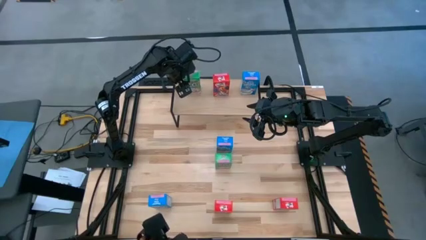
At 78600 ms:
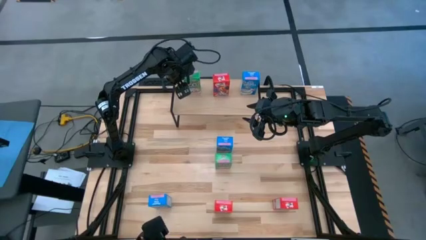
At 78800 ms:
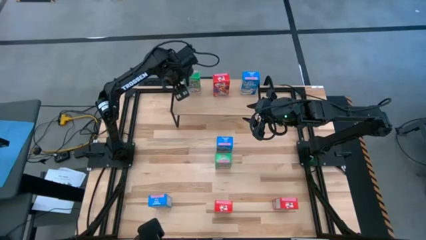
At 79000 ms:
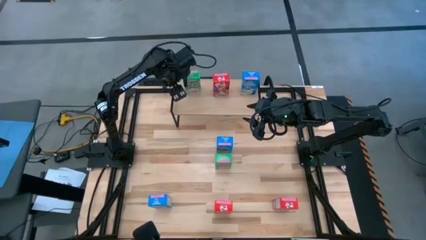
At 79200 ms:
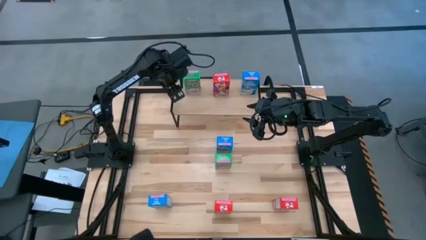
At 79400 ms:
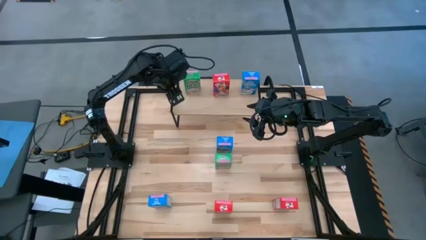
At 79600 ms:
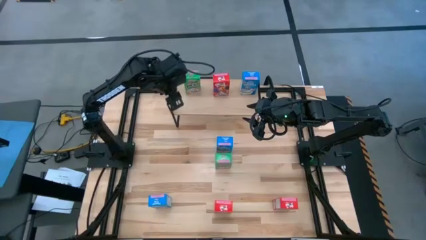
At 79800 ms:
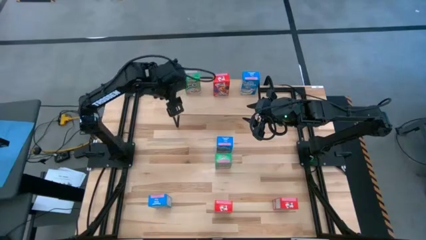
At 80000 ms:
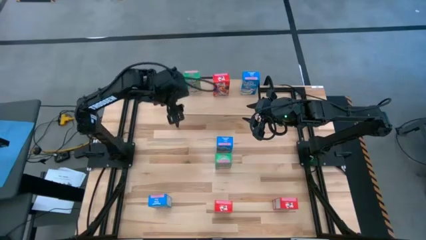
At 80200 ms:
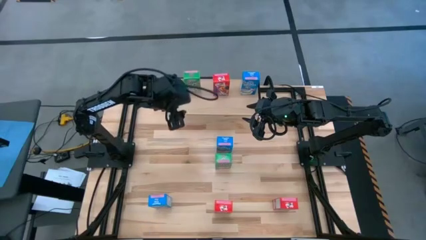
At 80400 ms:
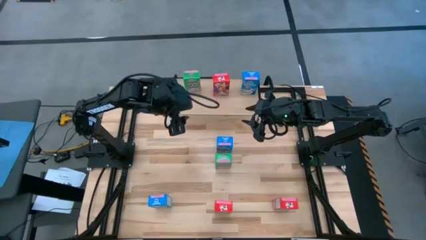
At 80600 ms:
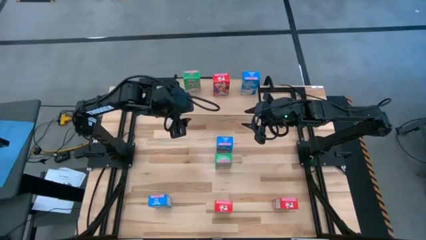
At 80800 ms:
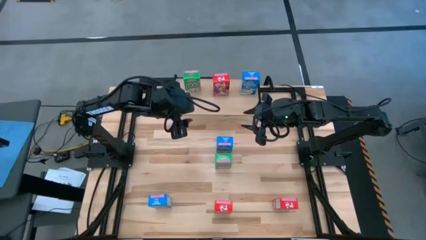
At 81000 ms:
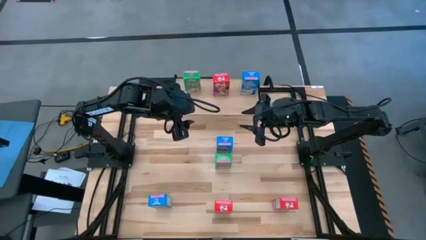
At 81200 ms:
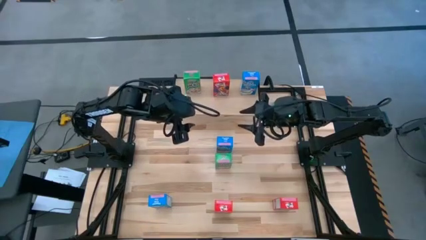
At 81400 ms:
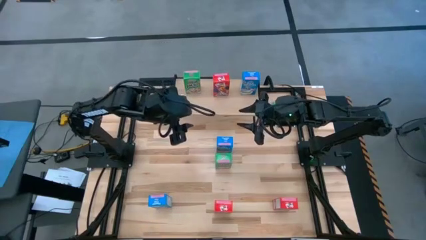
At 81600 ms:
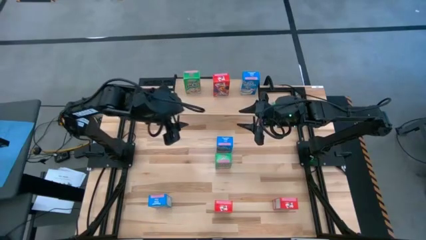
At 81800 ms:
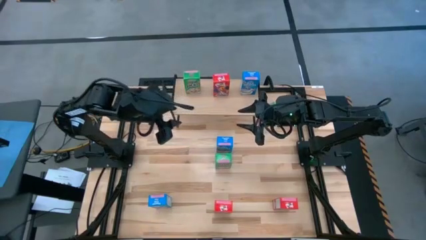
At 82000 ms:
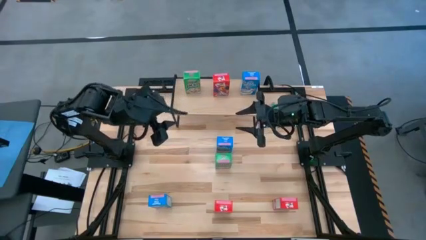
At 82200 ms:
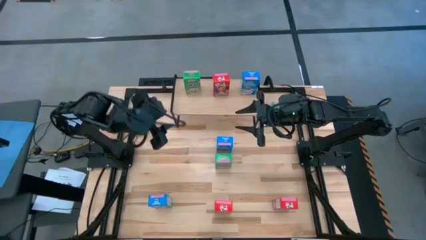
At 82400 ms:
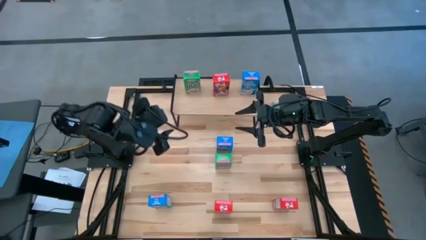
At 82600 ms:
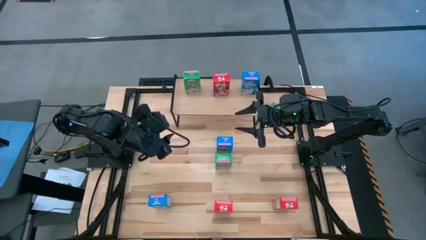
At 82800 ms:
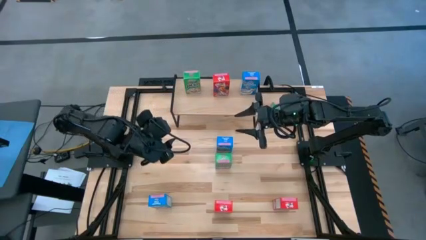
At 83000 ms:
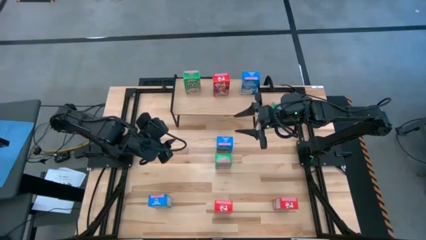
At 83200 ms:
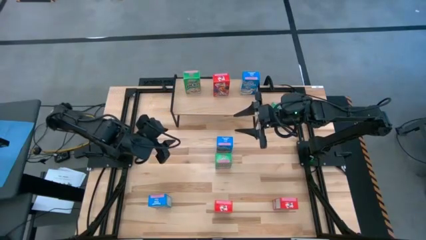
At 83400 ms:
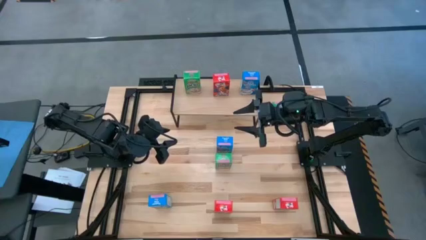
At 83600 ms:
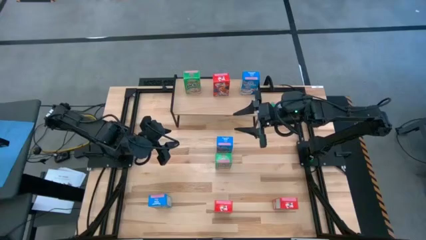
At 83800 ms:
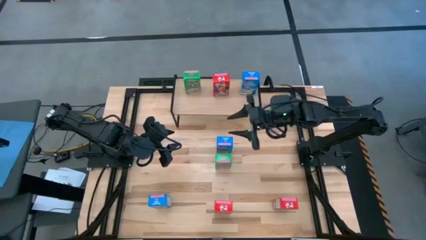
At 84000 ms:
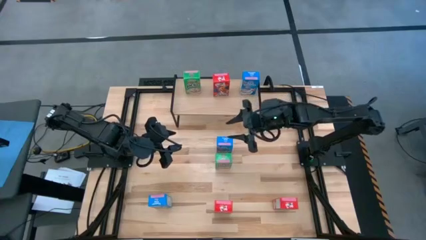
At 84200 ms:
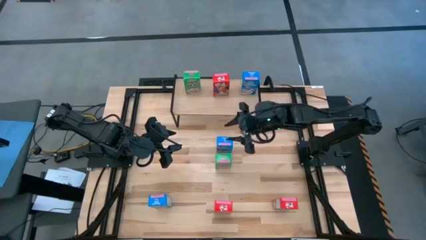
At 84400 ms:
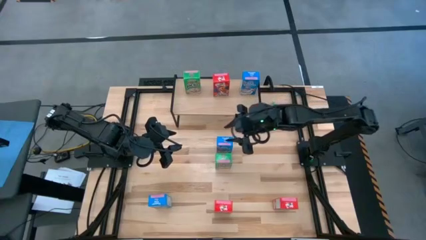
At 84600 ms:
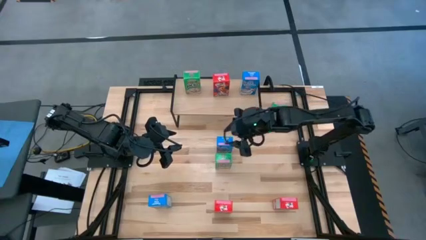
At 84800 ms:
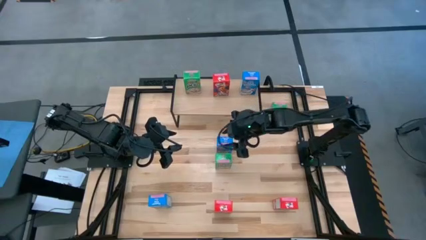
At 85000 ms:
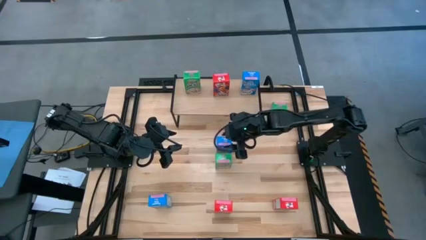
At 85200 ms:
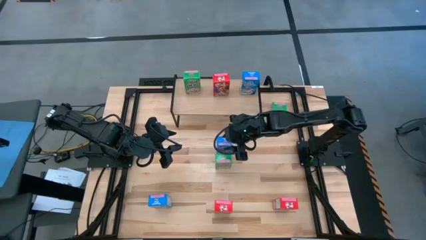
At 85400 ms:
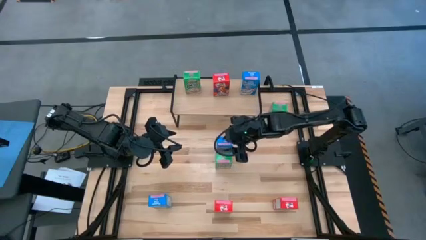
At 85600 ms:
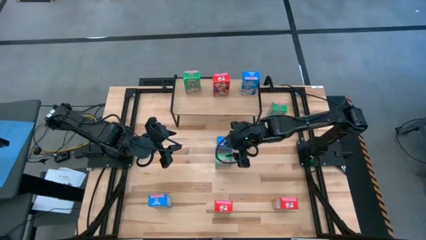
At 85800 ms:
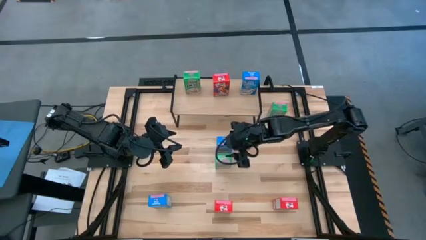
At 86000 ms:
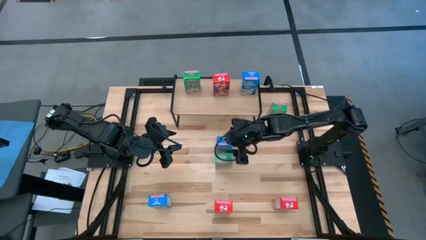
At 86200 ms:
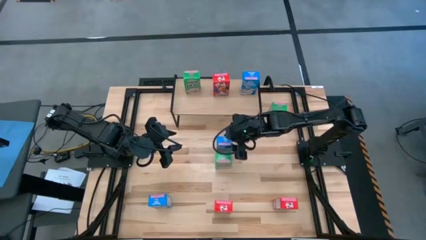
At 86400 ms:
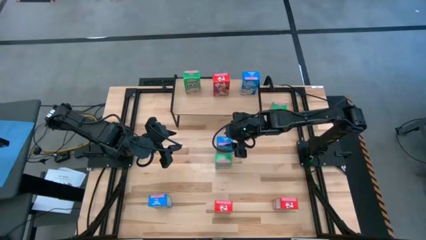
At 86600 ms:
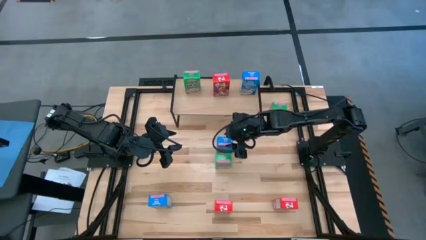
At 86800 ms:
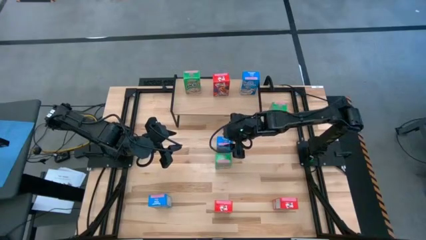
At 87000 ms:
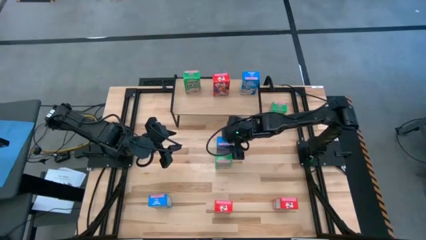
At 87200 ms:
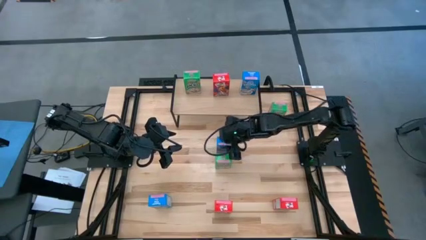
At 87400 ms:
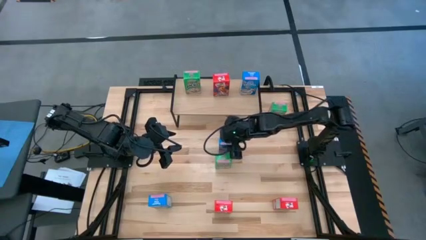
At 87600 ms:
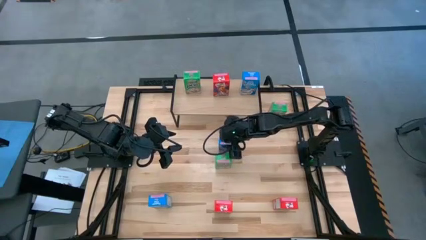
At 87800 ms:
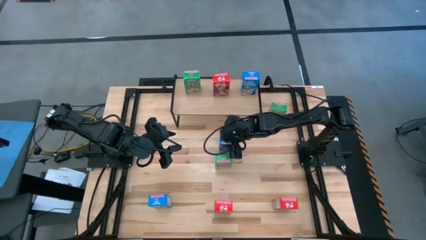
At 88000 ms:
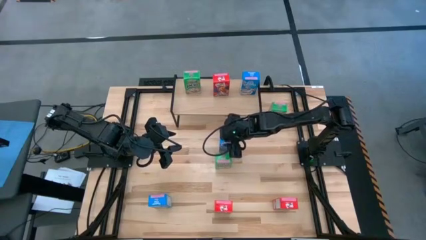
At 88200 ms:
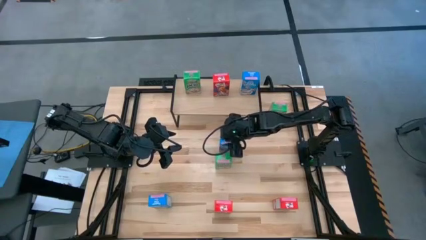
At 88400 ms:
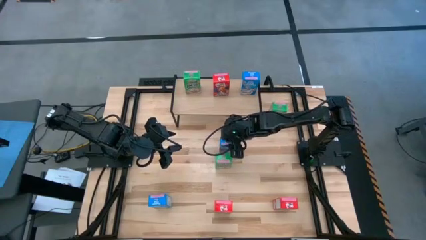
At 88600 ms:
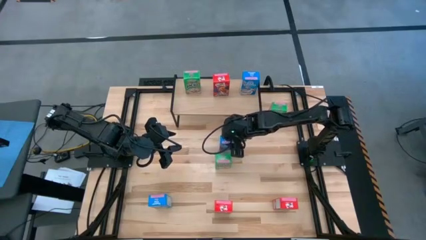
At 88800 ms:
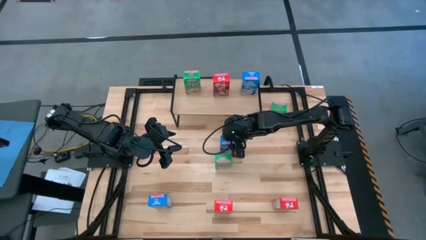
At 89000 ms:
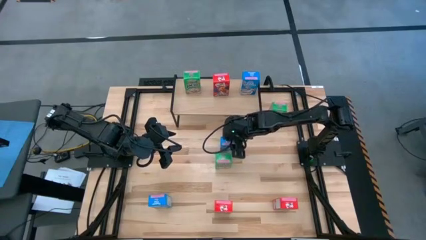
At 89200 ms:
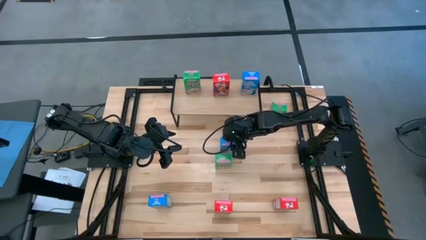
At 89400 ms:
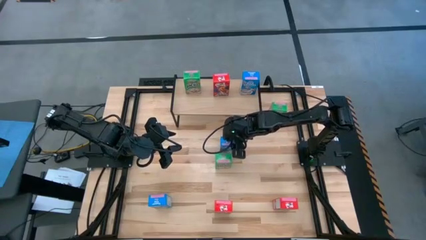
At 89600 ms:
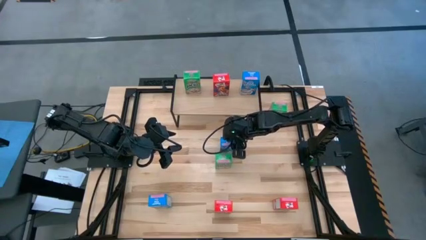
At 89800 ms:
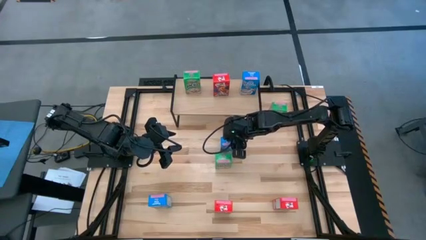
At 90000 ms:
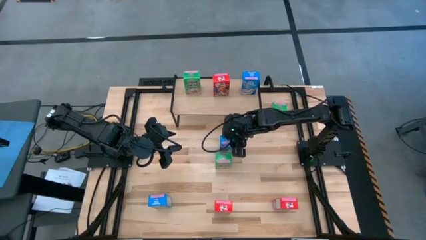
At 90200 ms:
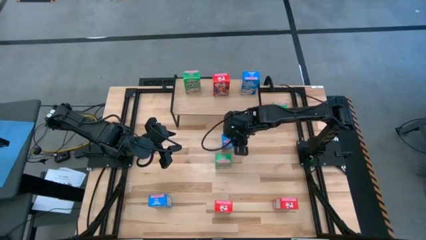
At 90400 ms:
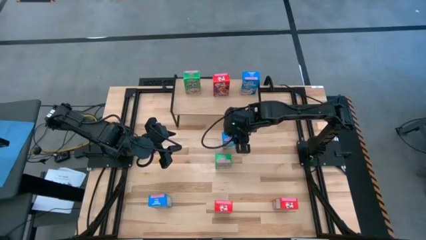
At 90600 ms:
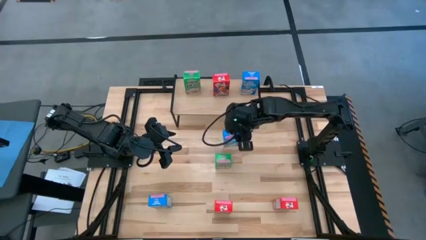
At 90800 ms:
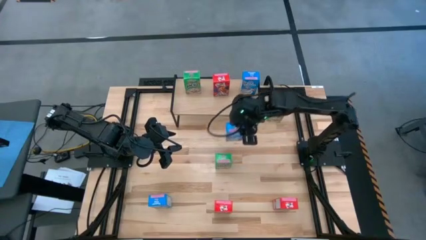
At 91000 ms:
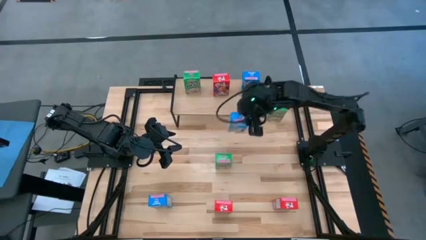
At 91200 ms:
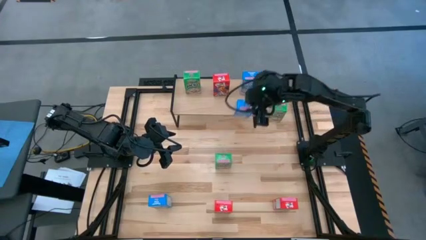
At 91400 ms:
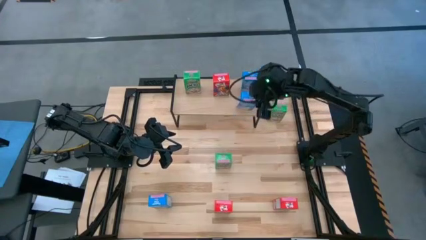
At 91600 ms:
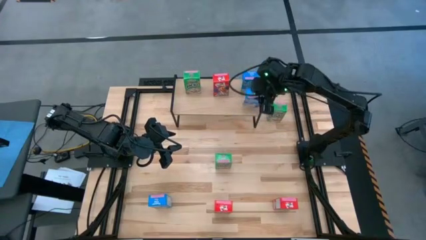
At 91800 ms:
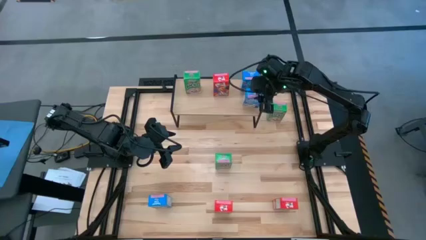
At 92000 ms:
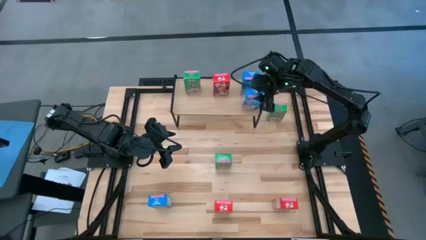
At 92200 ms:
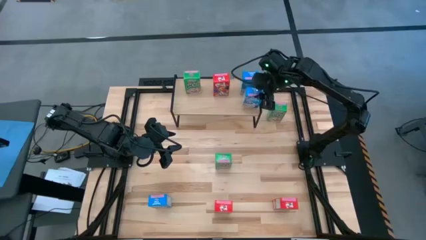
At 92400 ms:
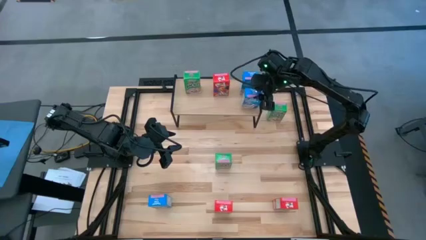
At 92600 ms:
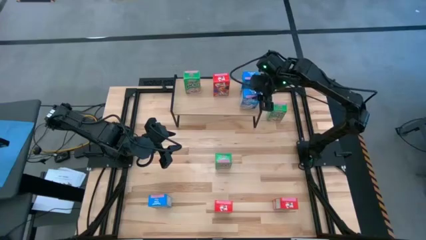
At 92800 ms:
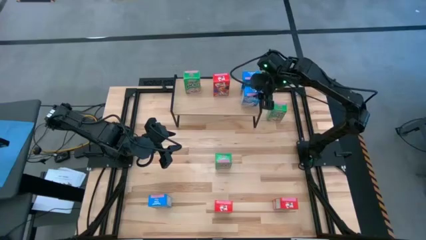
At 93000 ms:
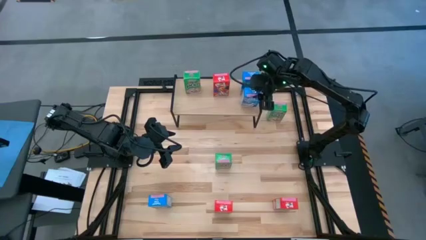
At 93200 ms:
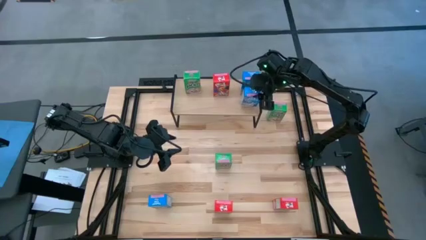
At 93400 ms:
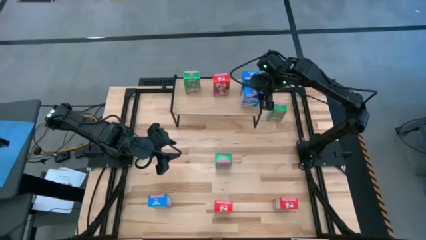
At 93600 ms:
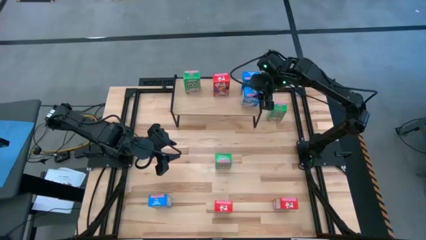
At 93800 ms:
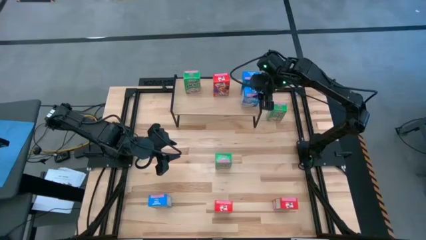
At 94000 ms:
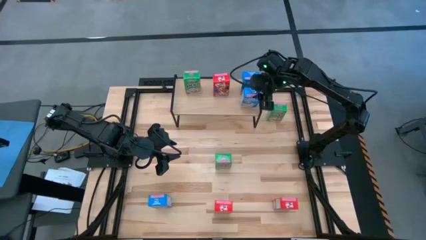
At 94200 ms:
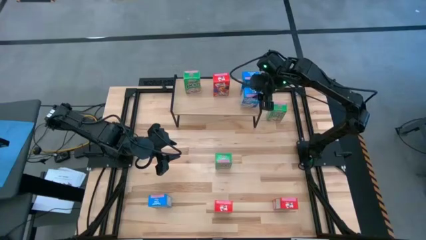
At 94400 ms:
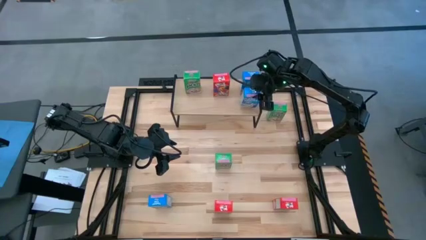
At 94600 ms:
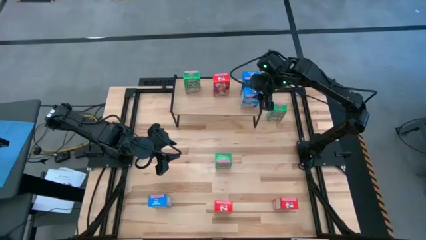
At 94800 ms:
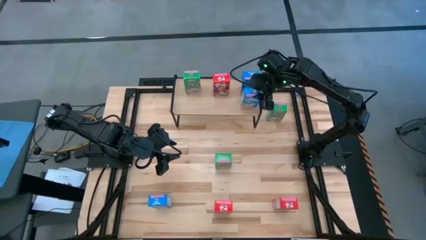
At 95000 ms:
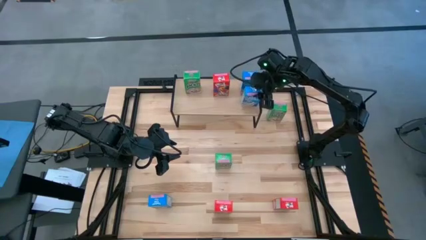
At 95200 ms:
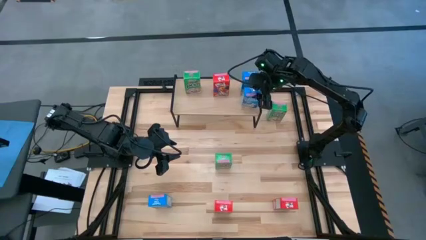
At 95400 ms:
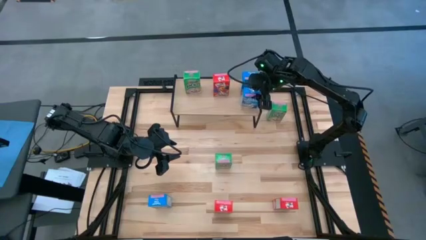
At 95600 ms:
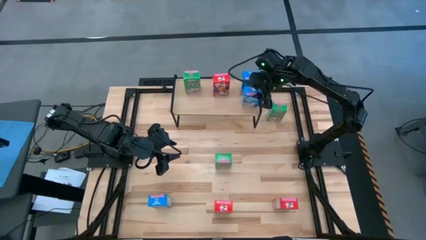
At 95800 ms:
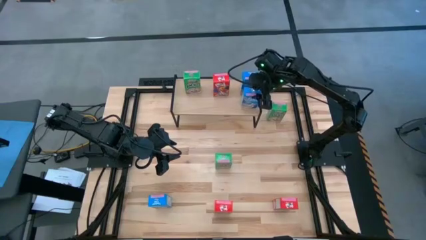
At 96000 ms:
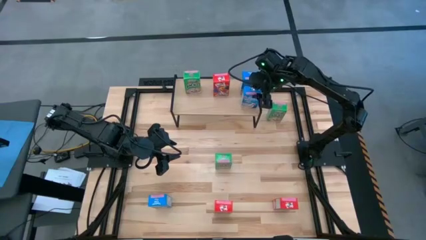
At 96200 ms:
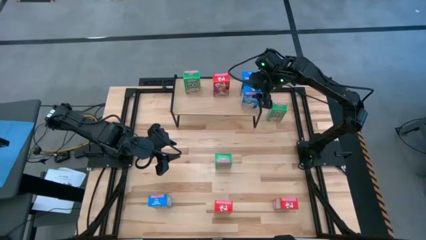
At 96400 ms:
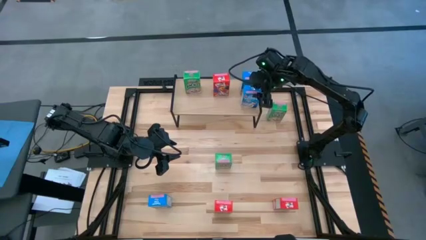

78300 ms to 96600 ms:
Task: Stack cereal on shelf
Put the top blue cereal box on the shelf aligned with the other blue cereal box
